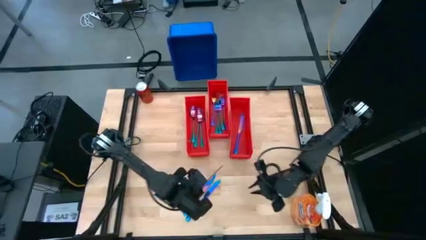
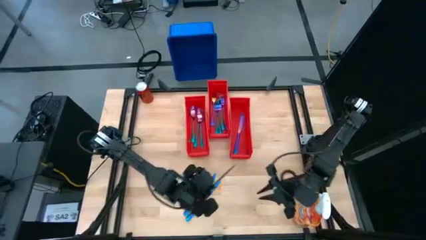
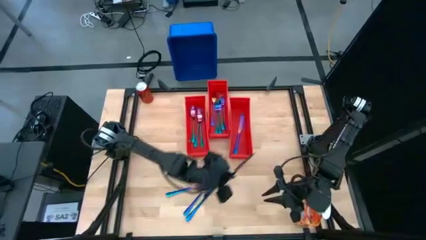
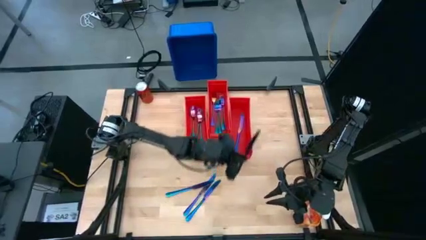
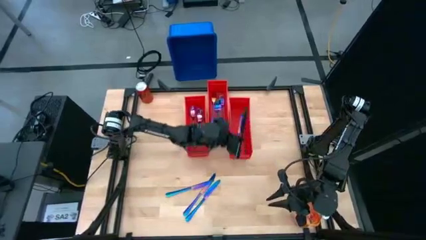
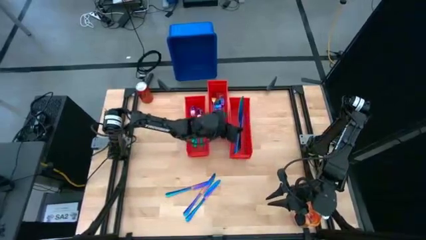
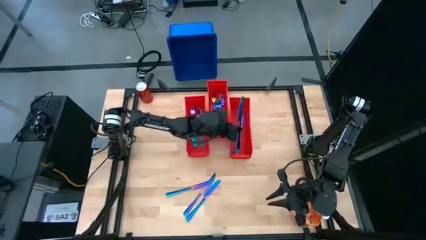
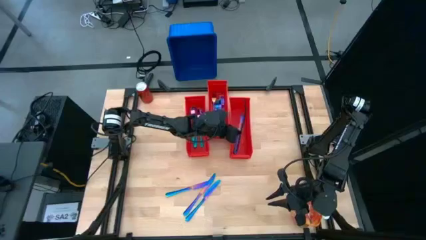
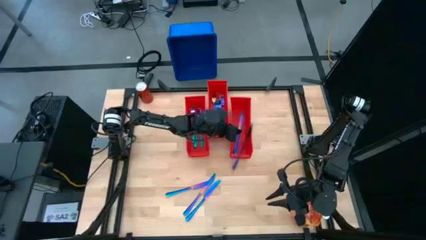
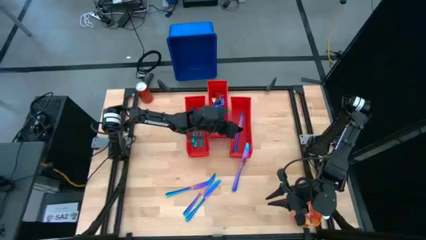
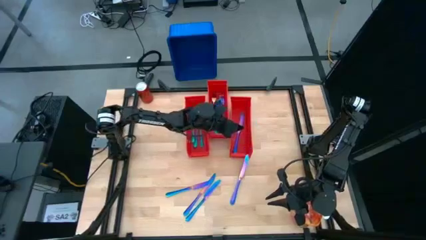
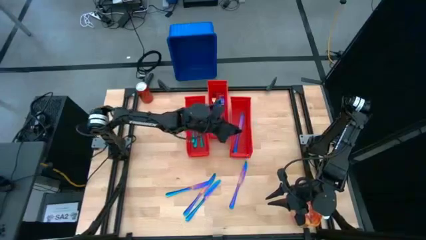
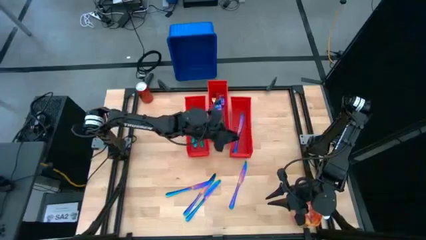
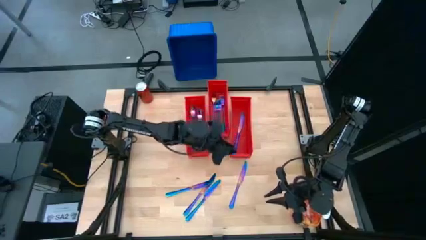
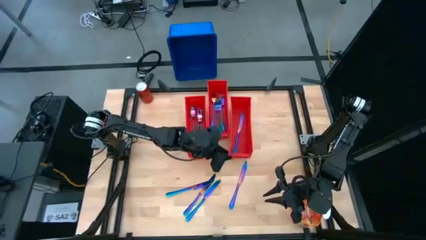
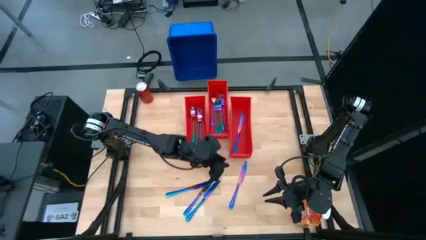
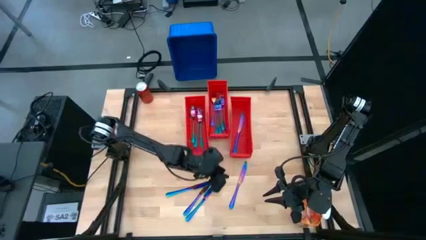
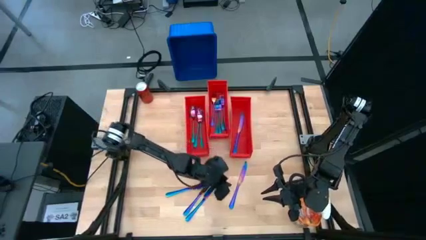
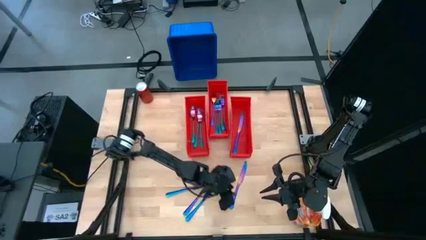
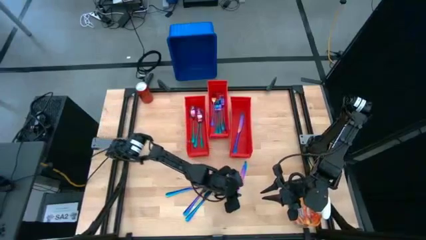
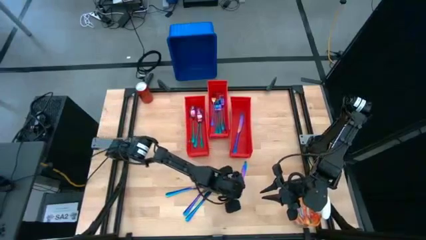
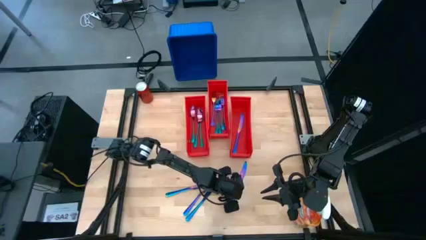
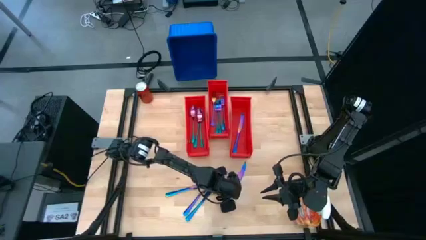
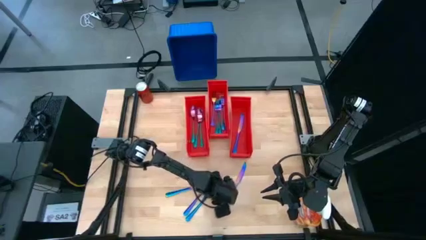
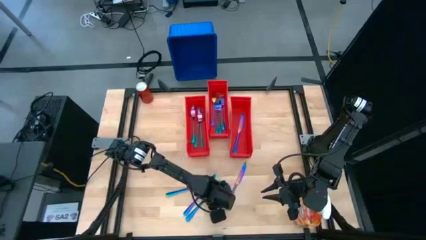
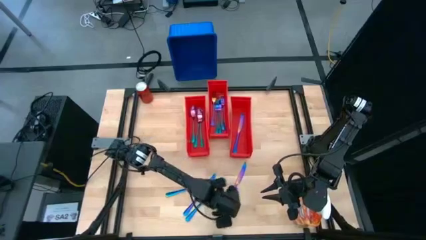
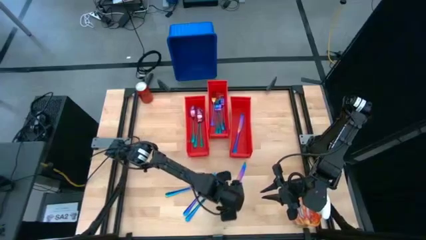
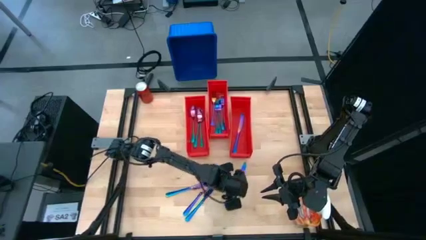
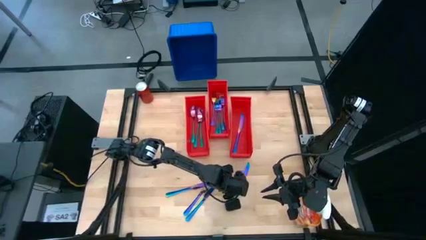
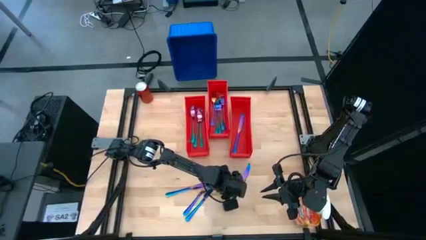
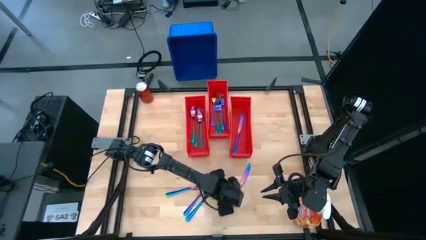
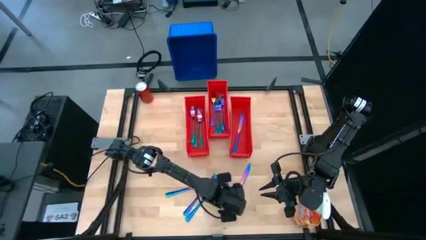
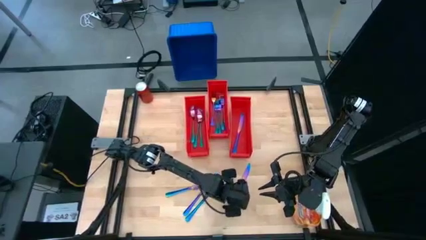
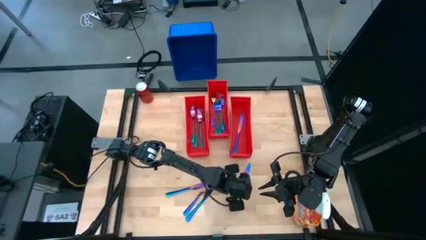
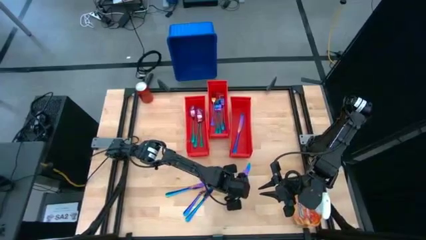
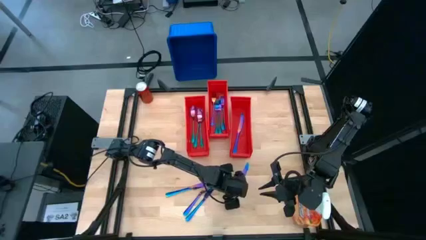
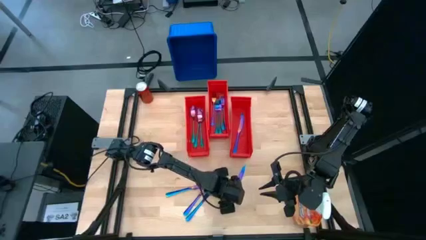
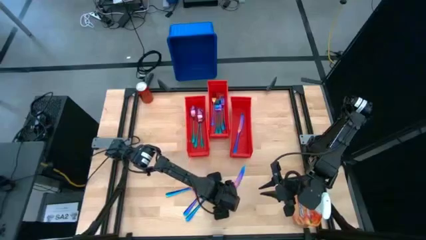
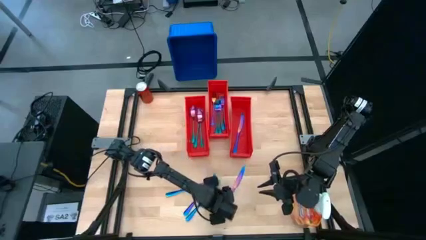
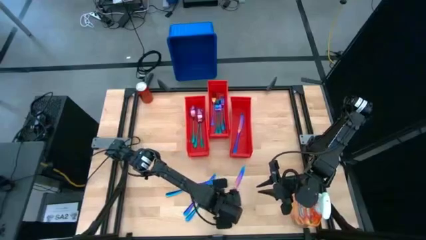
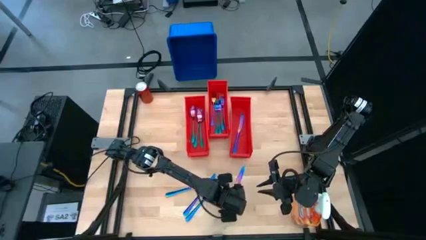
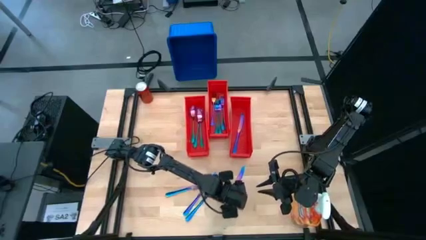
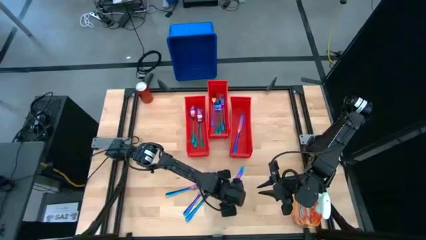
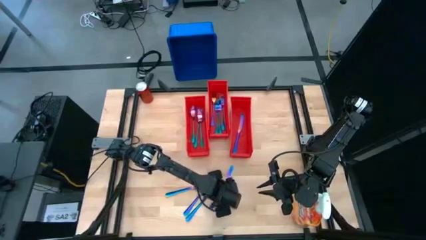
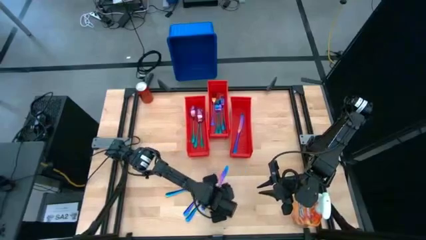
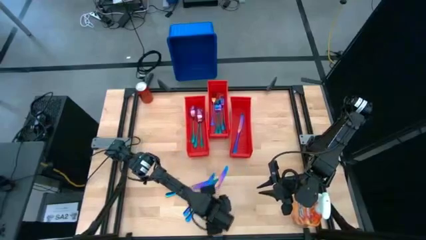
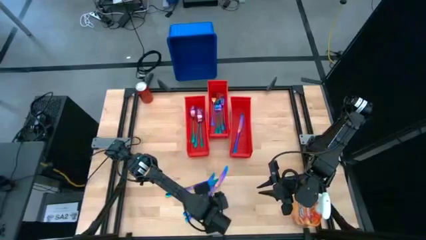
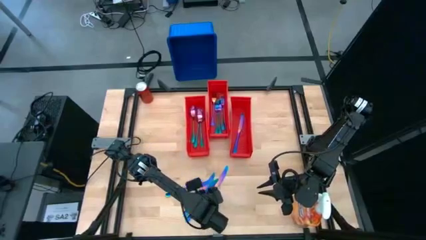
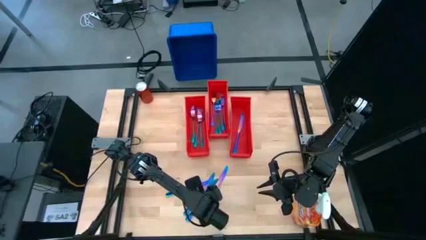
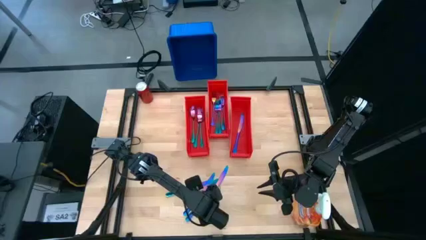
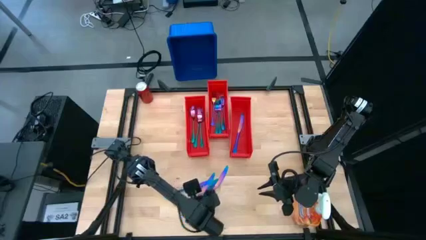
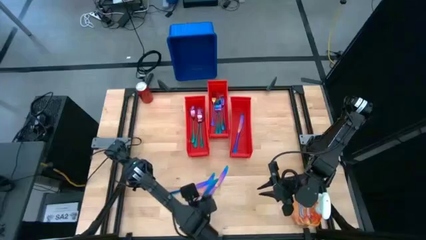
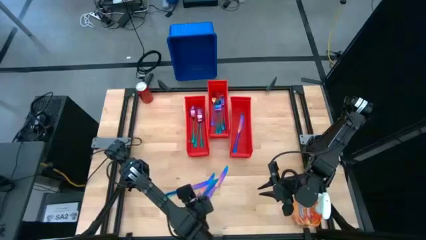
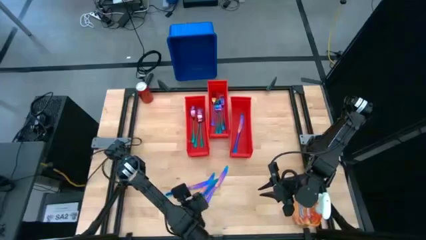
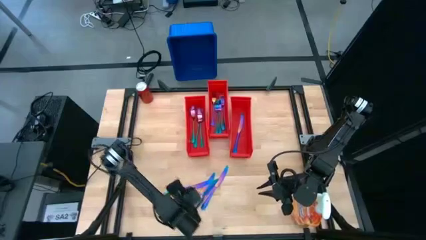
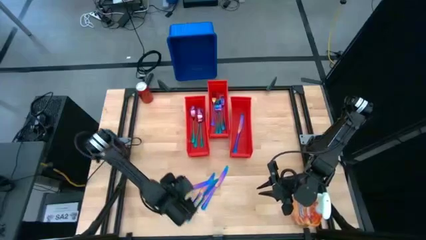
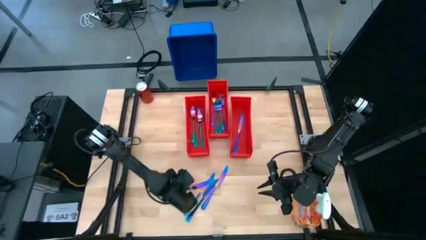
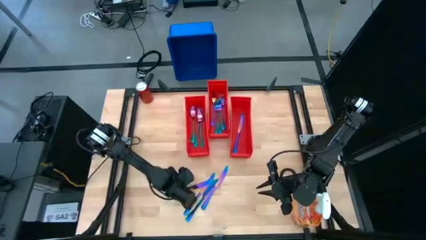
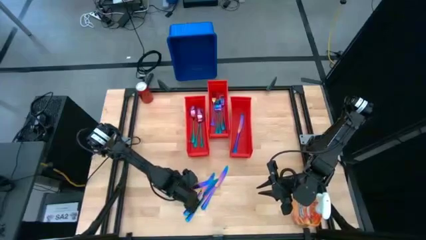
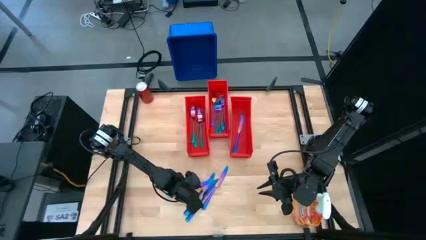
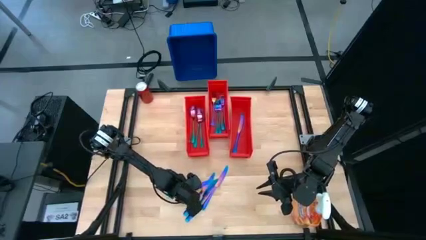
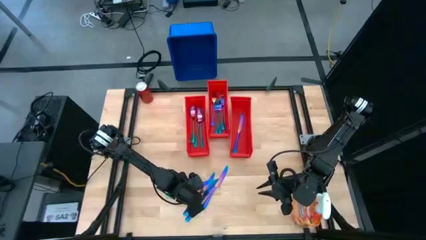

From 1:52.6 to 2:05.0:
Task: Sort silverware
Put the iridescent knife into the right orange bin
